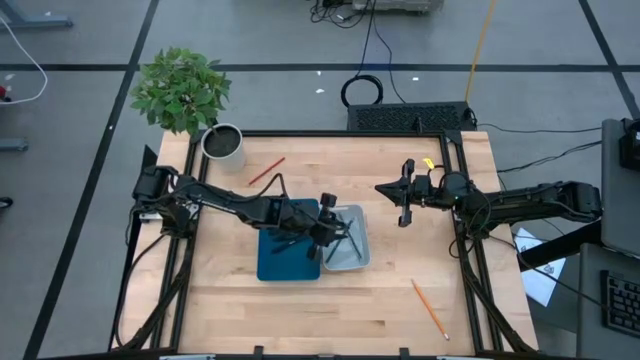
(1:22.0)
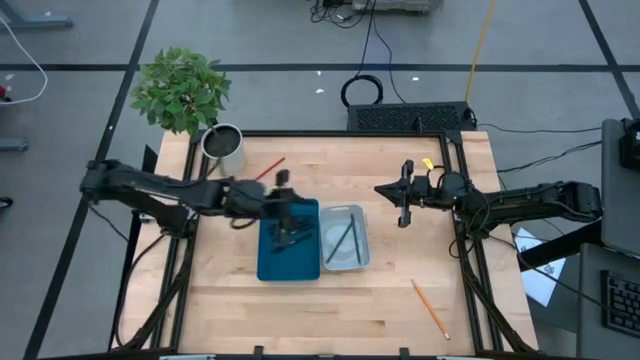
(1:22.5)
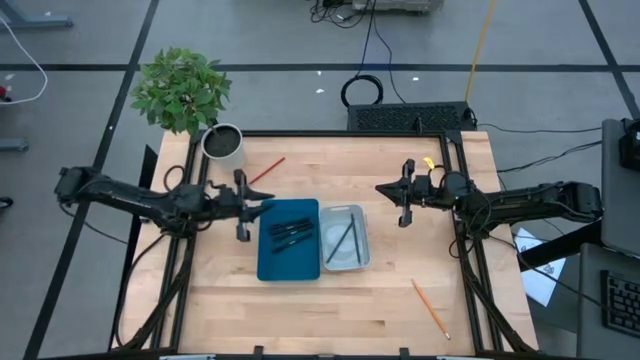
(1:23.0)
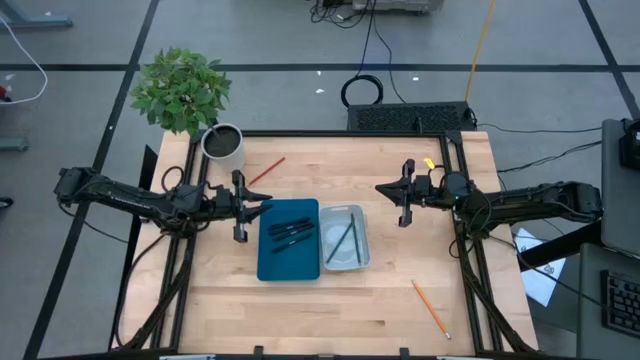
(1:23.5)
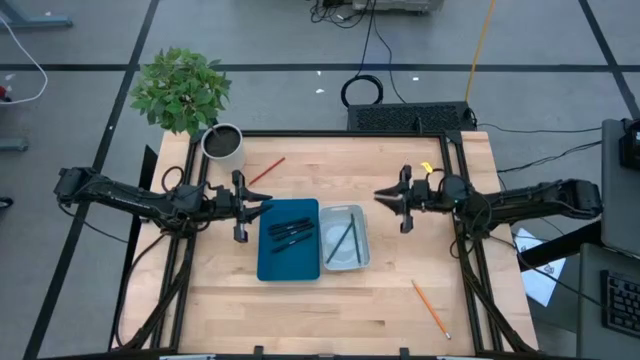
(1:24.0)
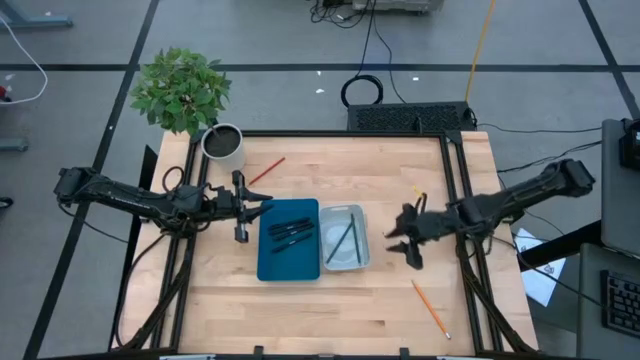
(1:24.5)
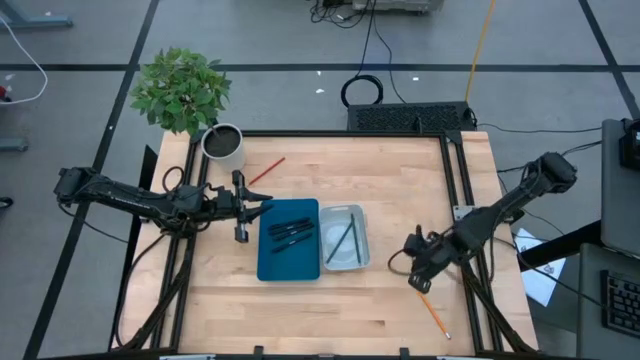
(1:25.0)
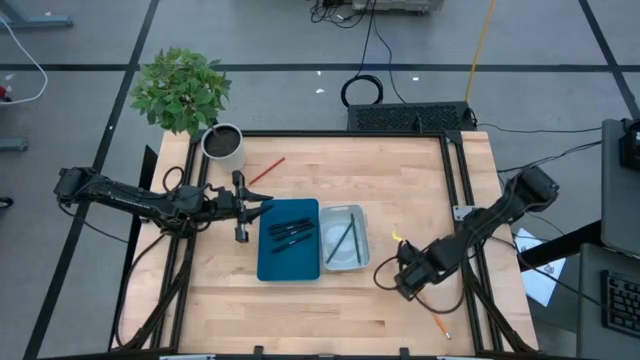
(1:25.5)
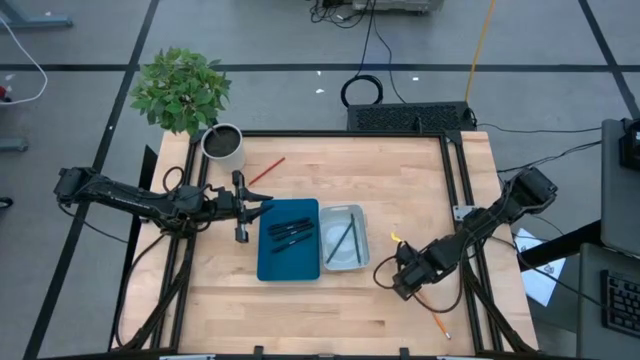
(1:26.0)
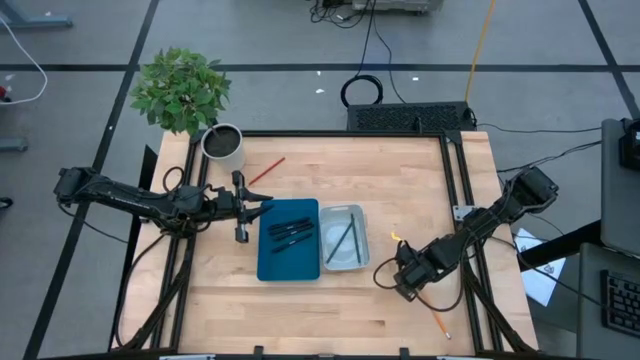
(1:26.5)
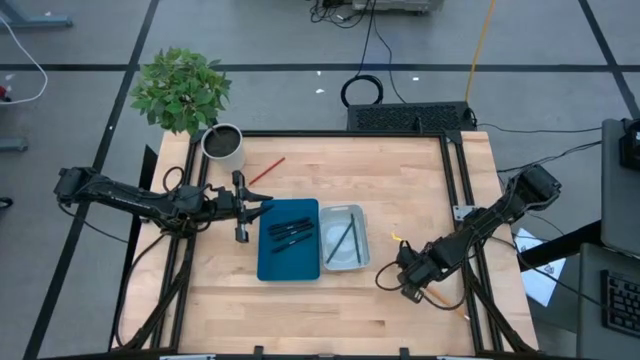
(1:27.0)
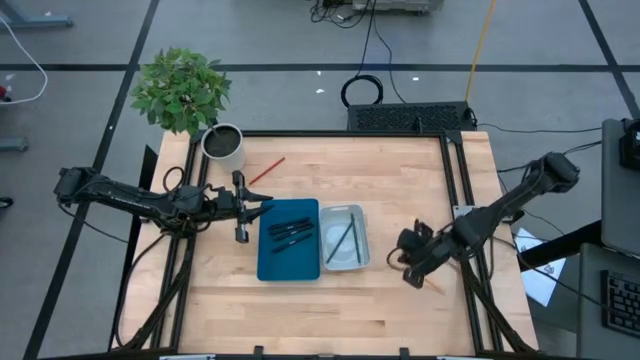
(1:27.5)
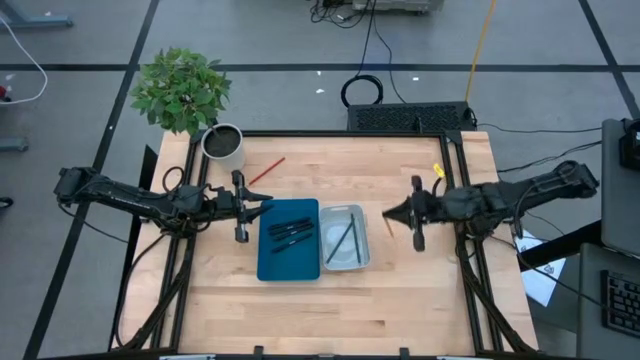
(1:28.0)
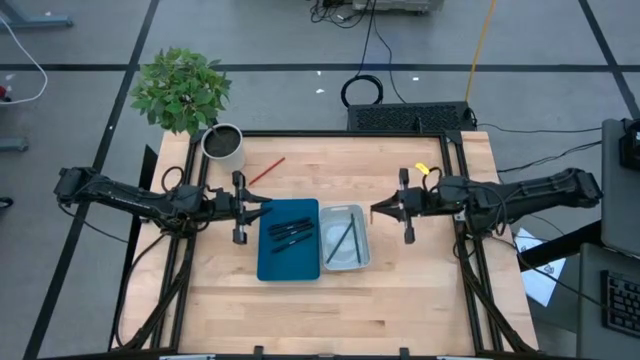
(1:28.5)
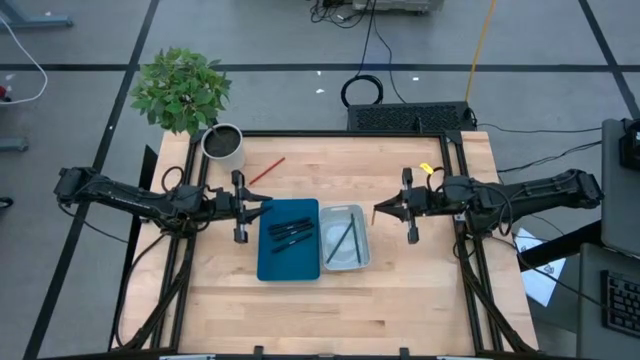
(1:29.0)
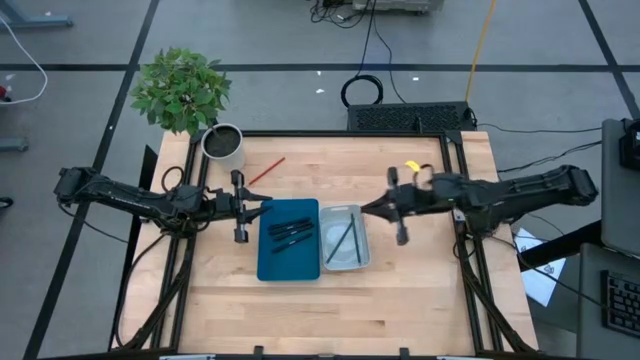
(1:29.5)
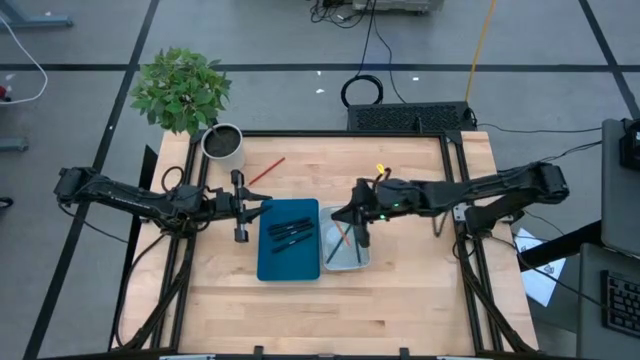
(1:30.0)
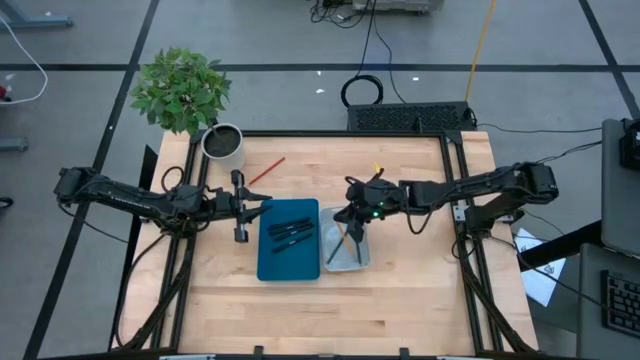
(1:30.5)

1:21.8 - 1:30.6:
Task: Sort pens & pencils
Put the orange pencil into the white bin

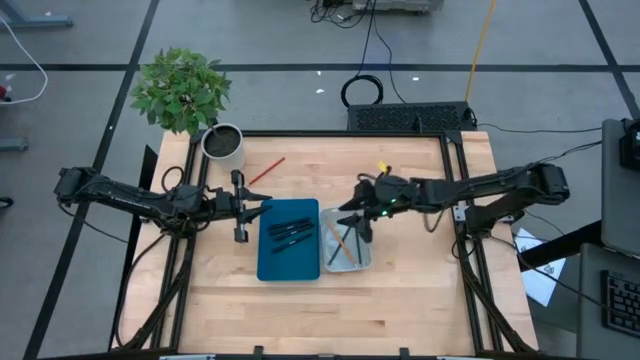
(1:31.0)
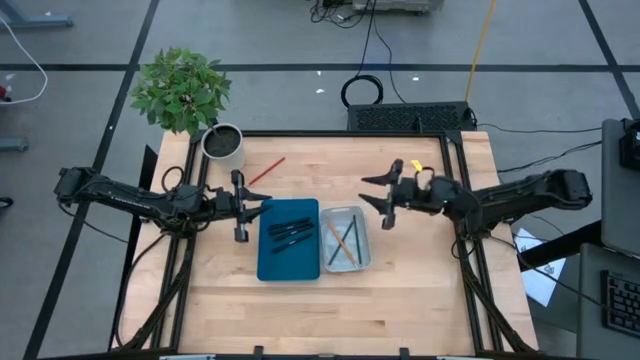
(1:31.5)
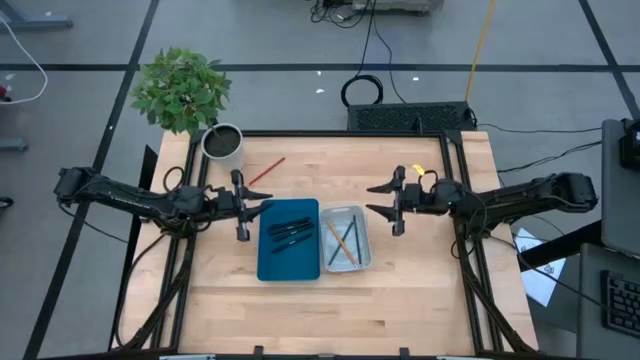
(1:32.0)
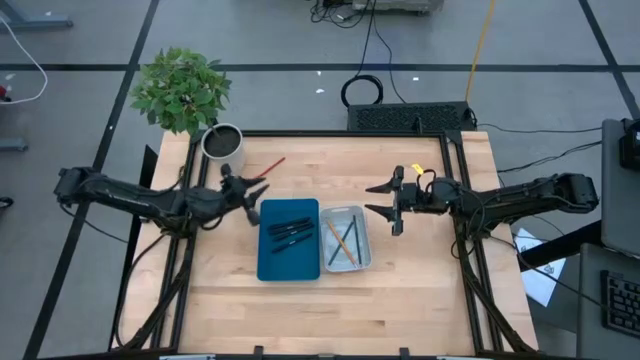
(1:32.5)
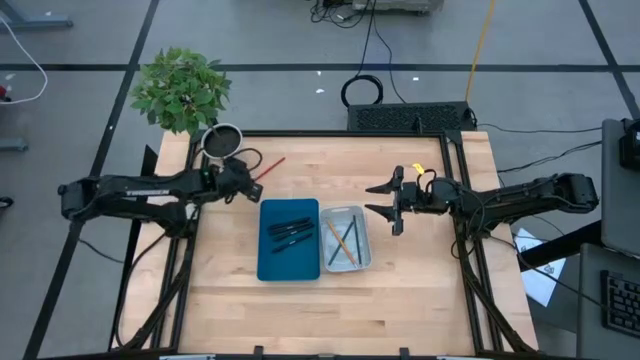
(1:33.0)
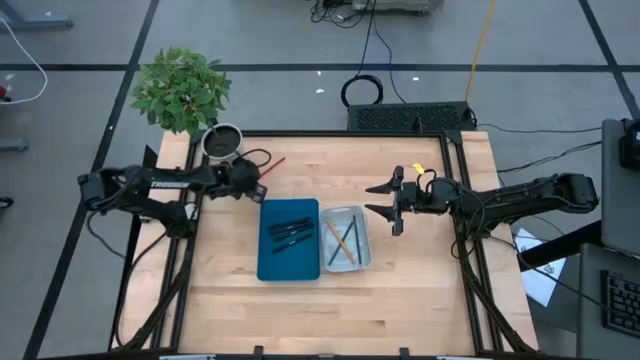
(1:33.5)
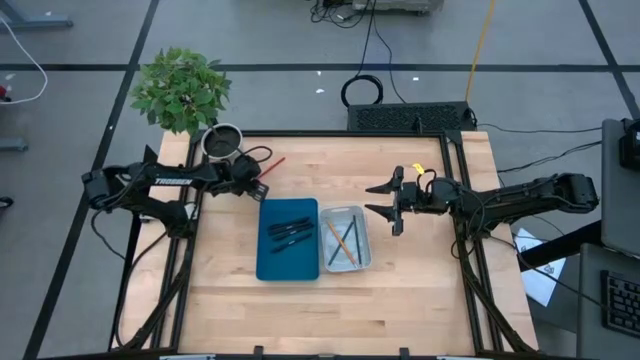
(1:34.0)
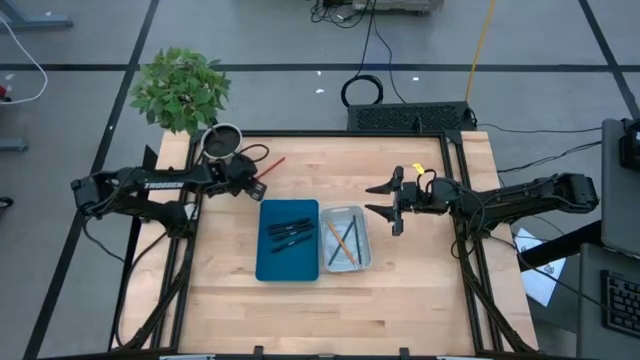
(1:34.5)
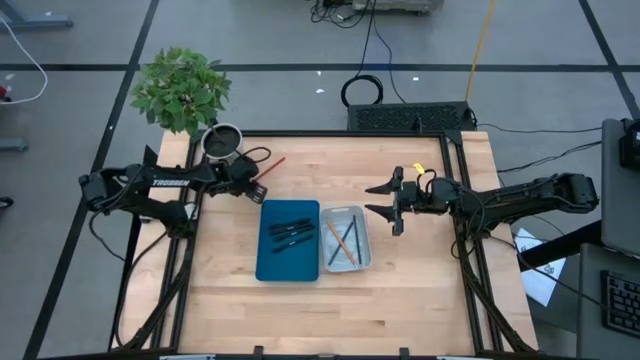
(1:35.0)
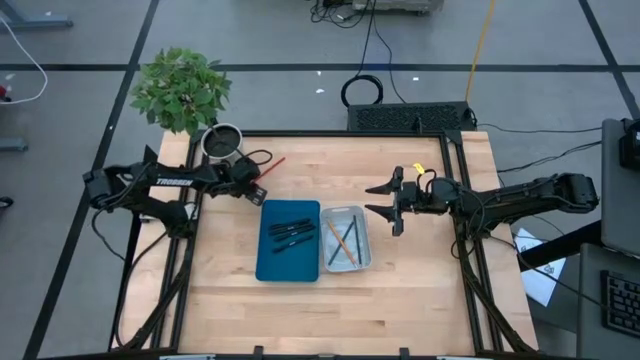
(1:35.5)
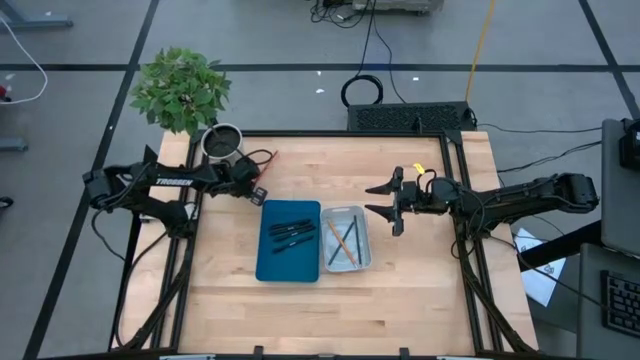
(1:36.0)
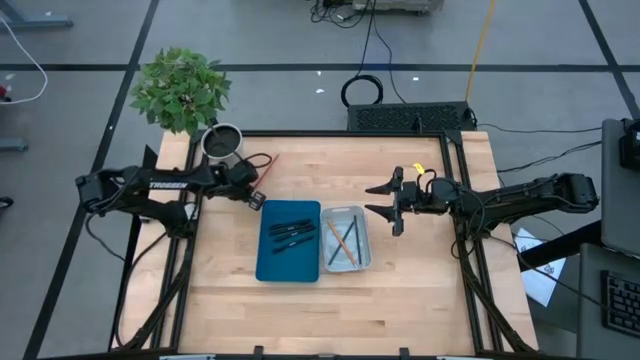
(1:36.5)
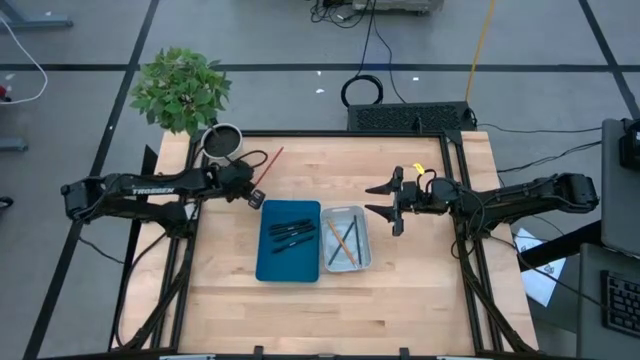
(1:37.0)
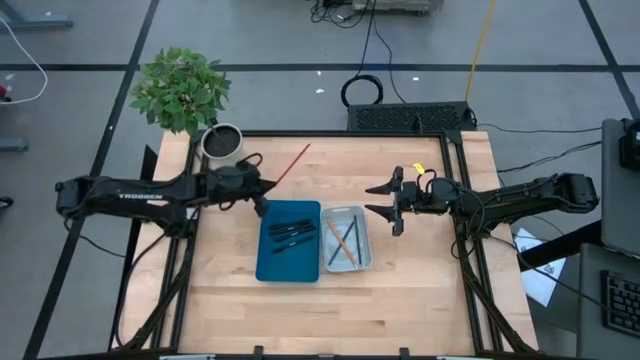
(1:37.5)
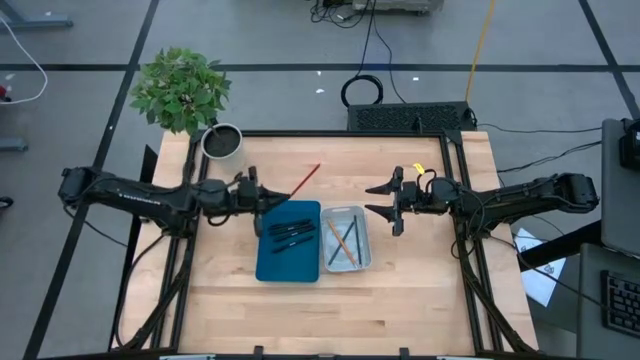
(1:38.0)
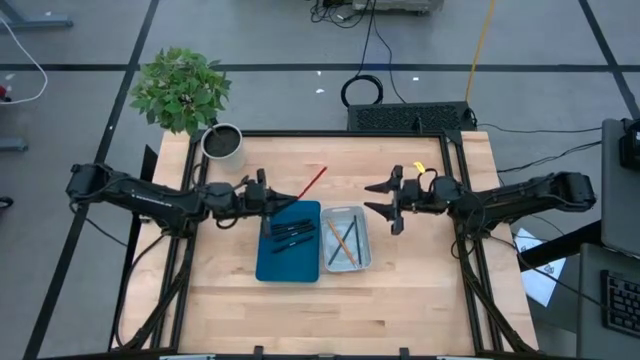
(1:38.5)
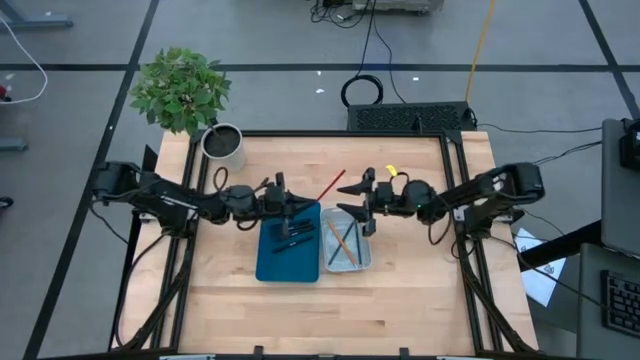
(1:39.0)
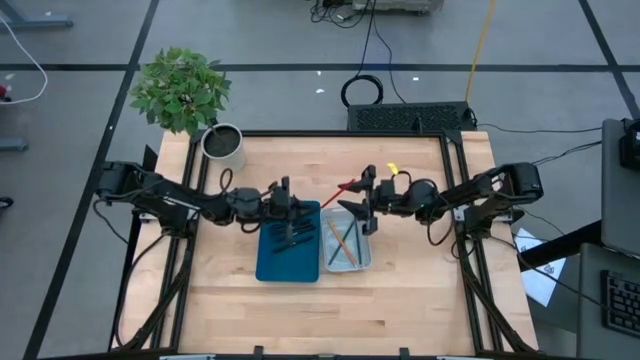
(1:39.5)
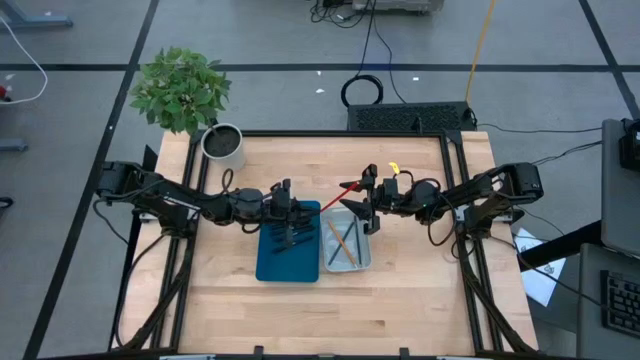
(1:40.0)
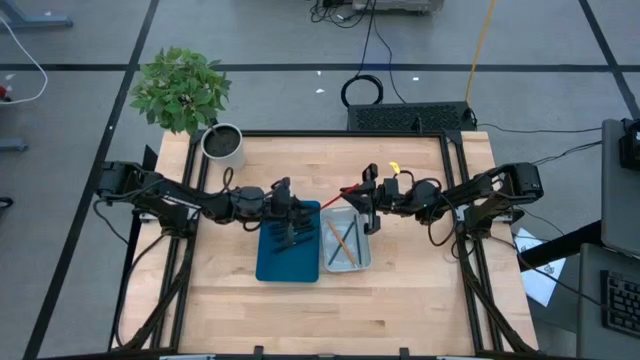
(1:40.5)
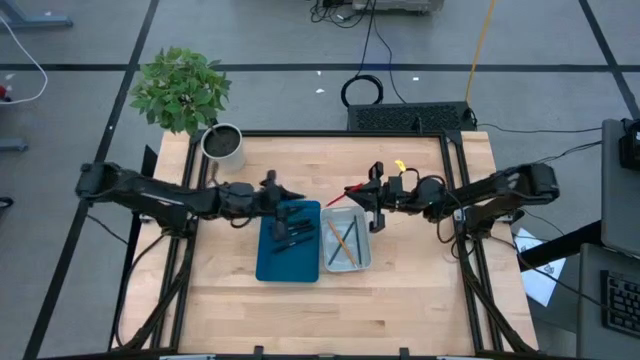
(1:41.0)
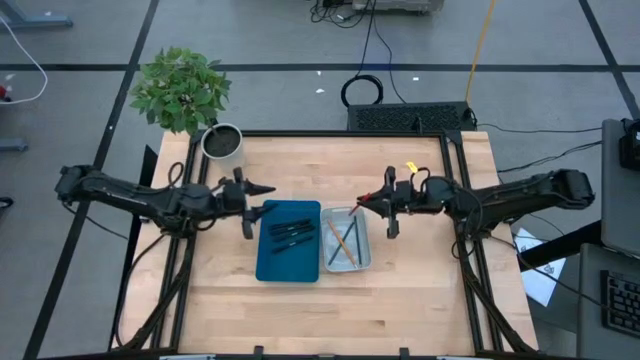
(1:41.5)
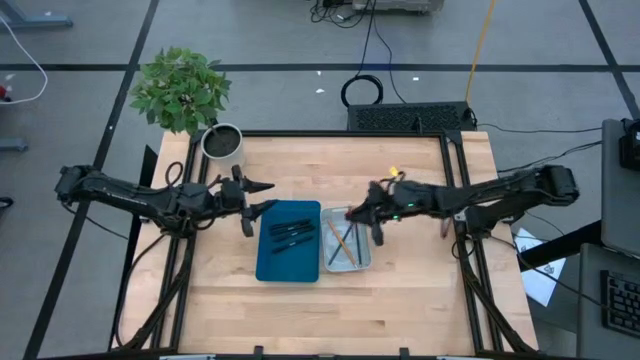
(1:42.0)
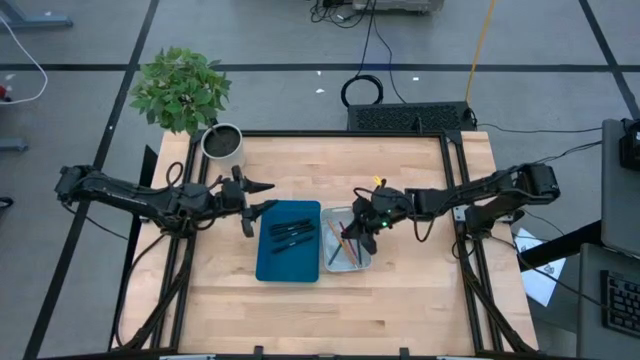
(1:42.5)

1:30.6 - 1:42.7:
Put the red colored pencil into the white bin

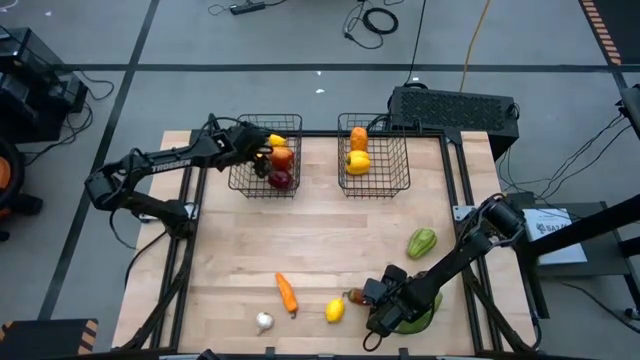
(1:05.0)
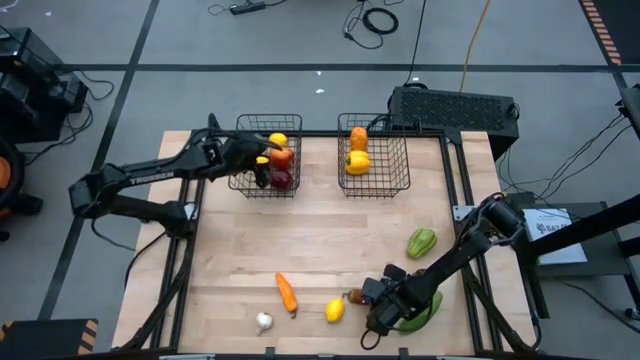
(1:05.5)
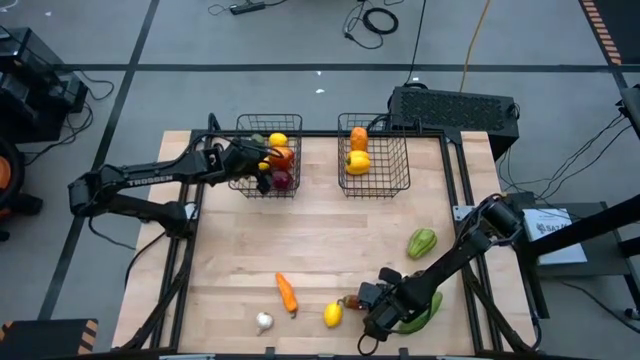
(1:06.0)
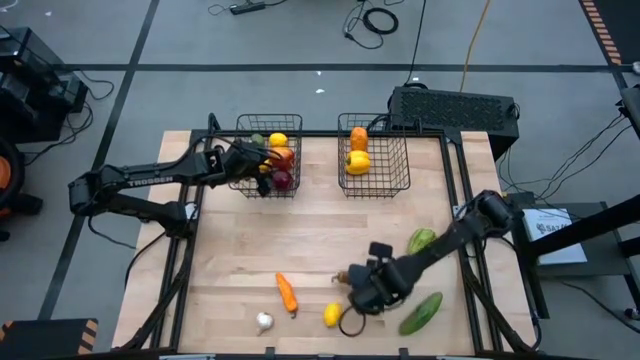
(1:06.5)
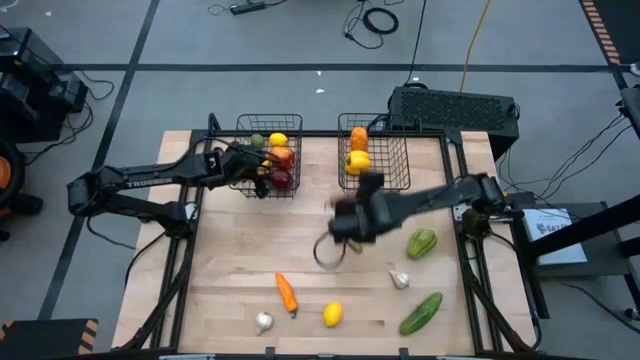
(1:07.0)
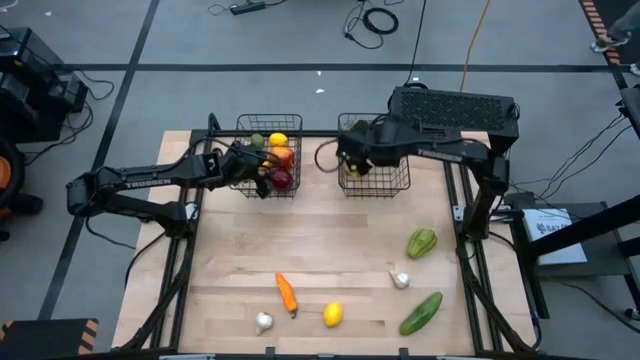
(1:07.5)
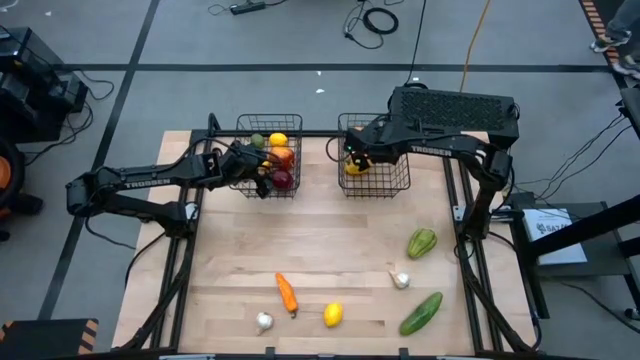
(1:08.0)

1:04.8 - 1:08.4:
Task: Sort produce into baskets
Put the red chili pepper into the right mesh basket
